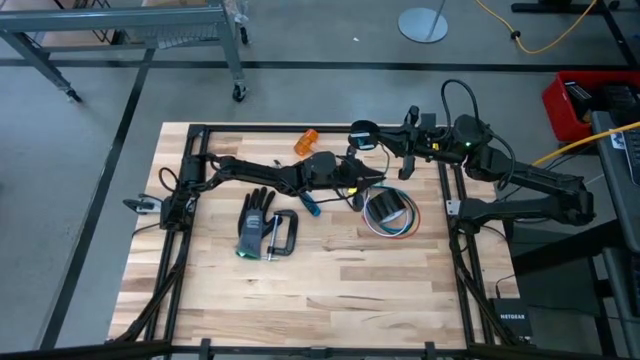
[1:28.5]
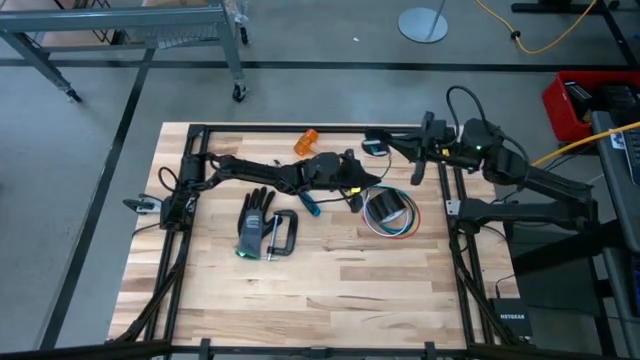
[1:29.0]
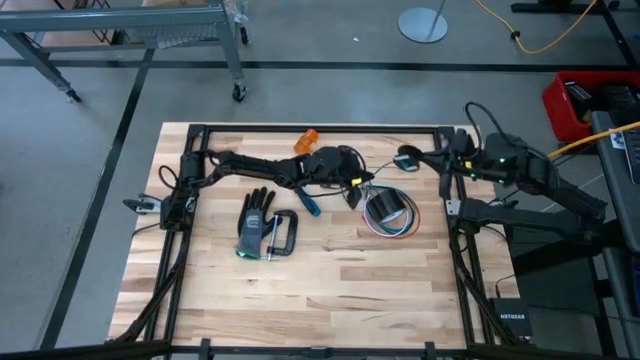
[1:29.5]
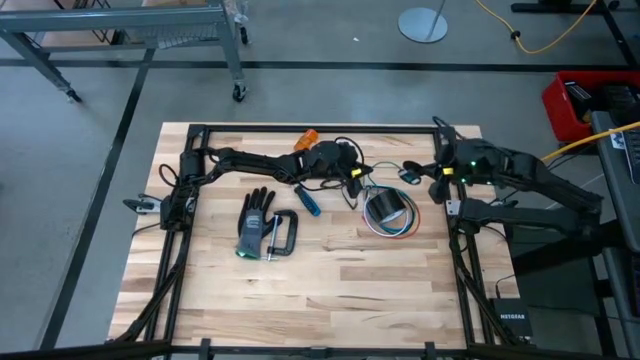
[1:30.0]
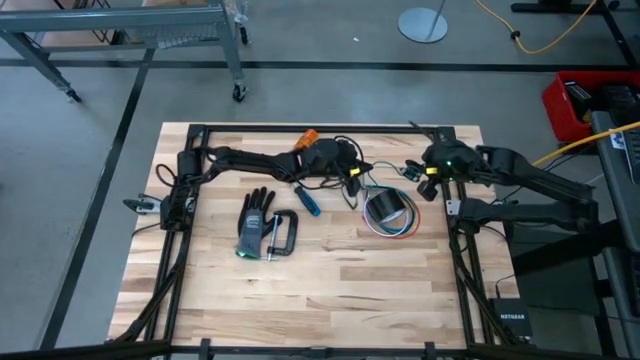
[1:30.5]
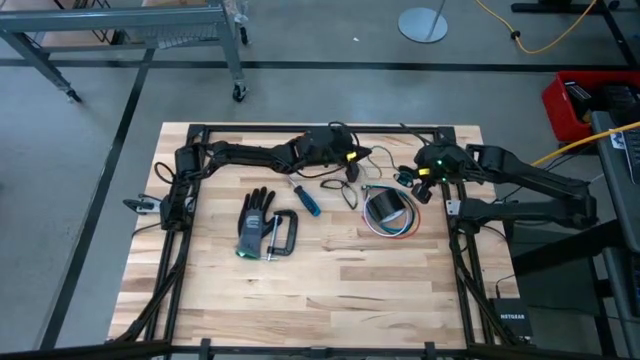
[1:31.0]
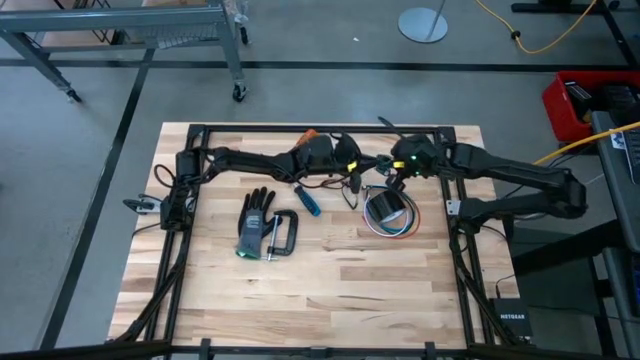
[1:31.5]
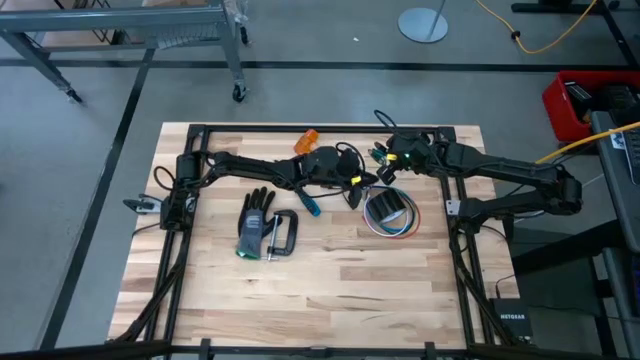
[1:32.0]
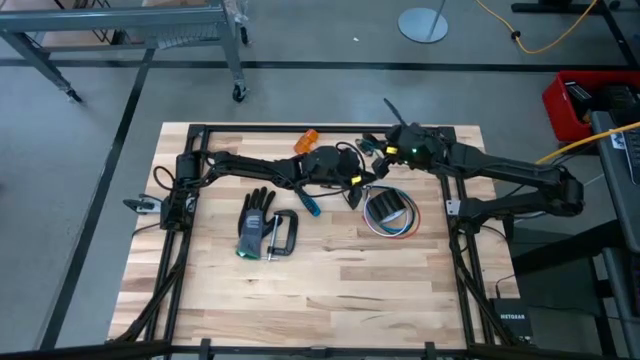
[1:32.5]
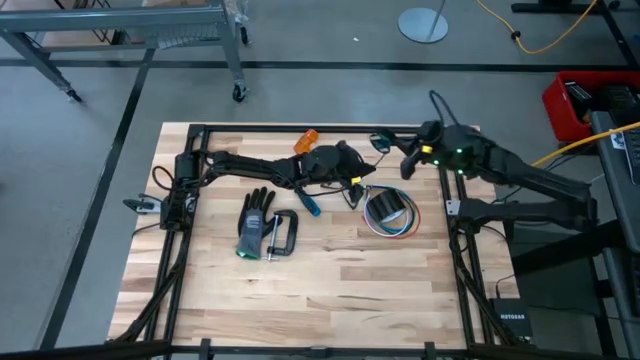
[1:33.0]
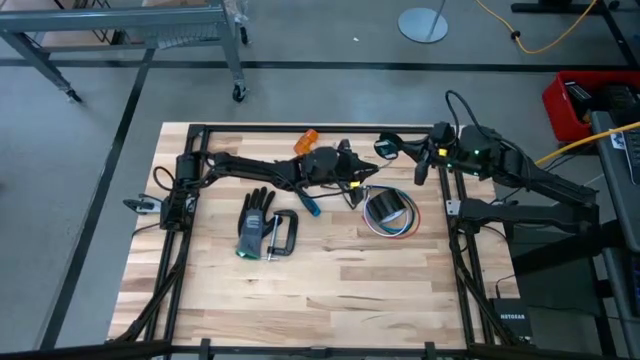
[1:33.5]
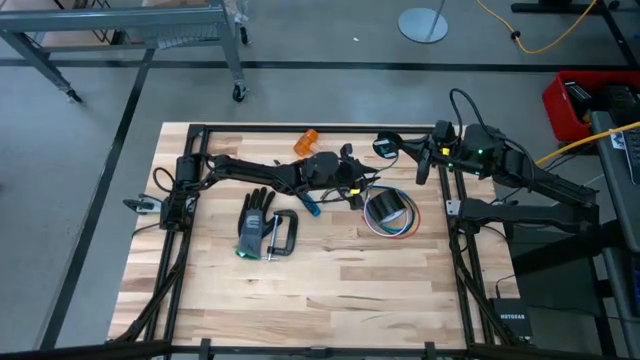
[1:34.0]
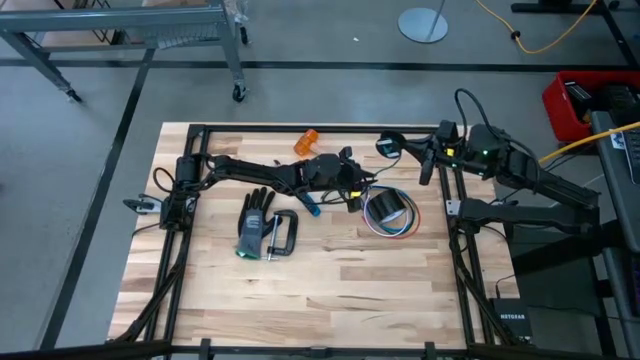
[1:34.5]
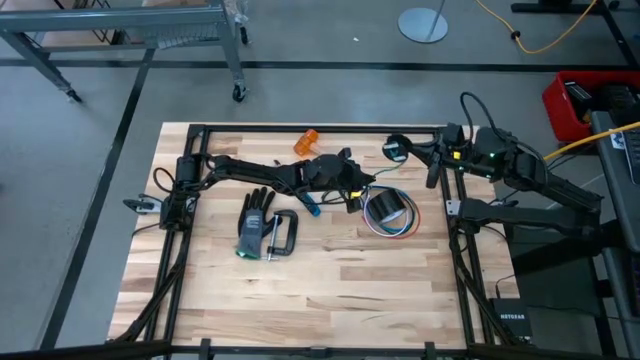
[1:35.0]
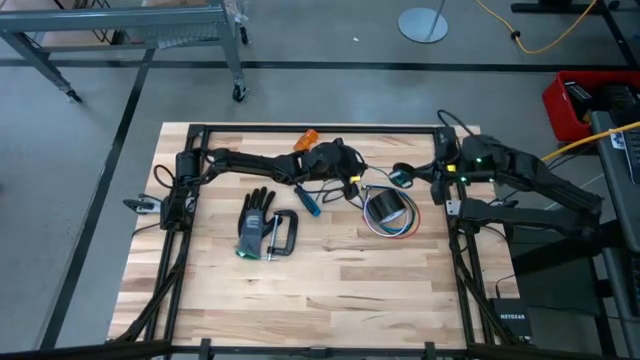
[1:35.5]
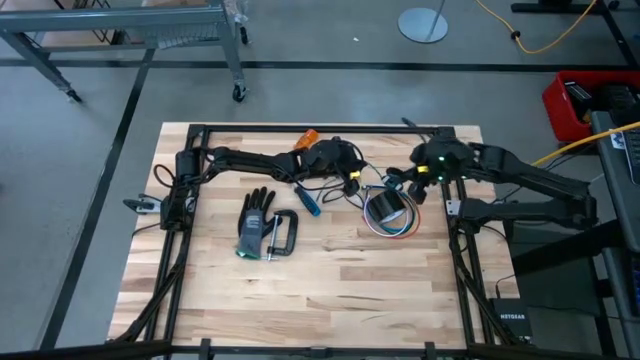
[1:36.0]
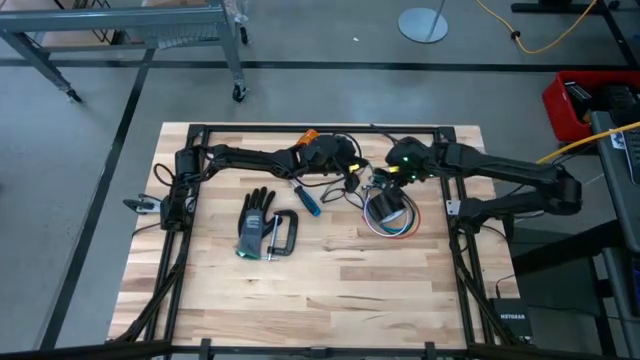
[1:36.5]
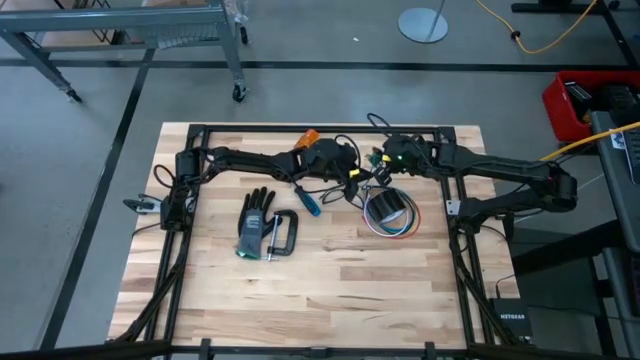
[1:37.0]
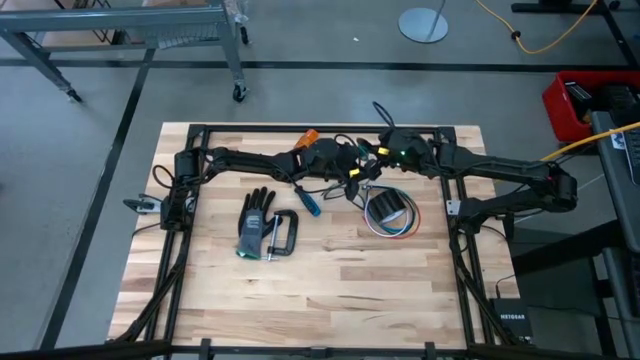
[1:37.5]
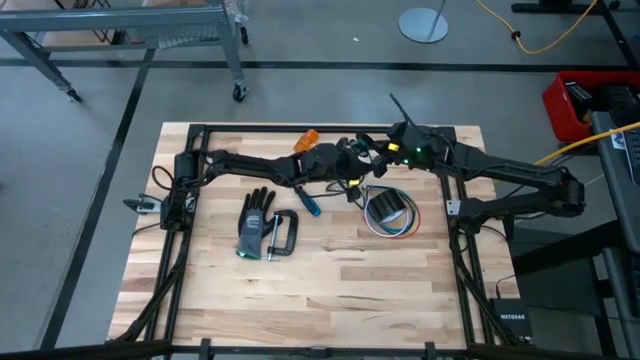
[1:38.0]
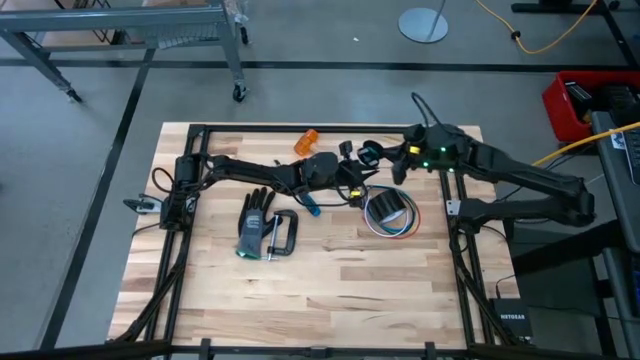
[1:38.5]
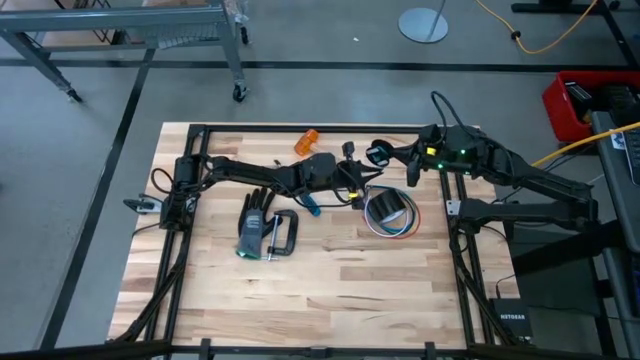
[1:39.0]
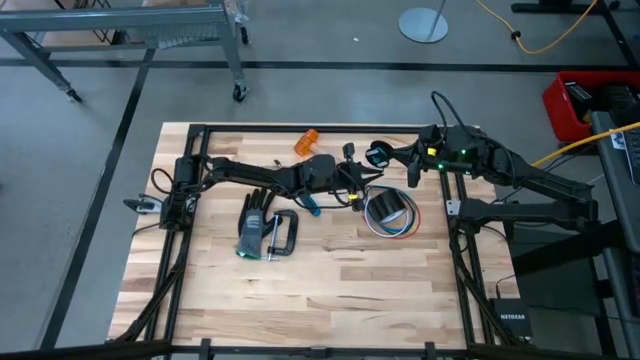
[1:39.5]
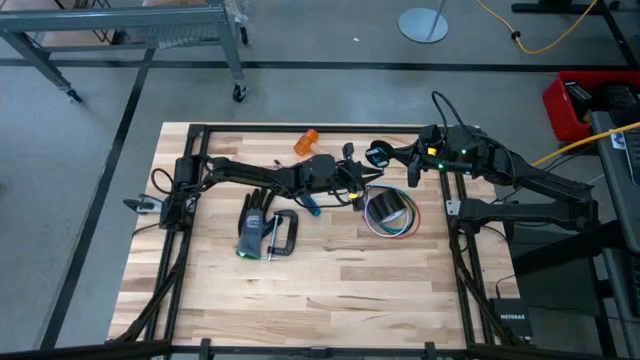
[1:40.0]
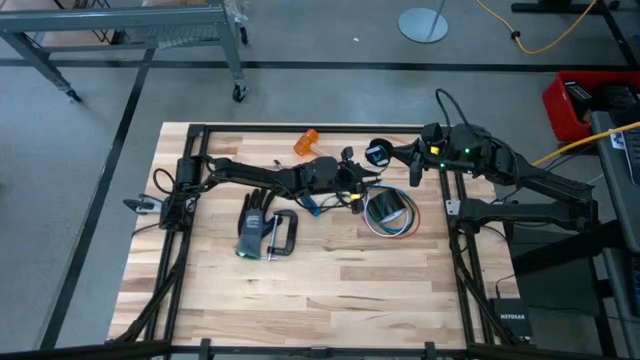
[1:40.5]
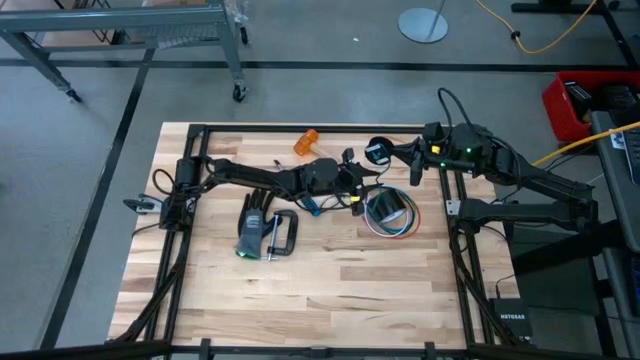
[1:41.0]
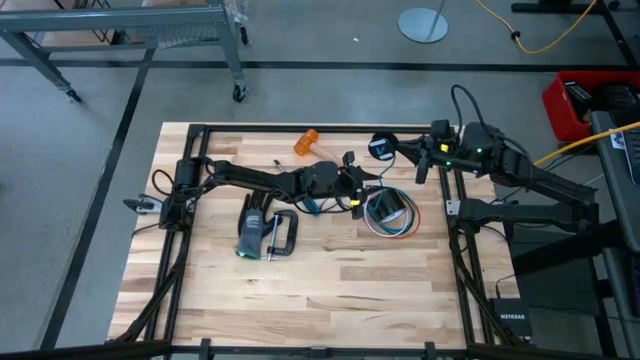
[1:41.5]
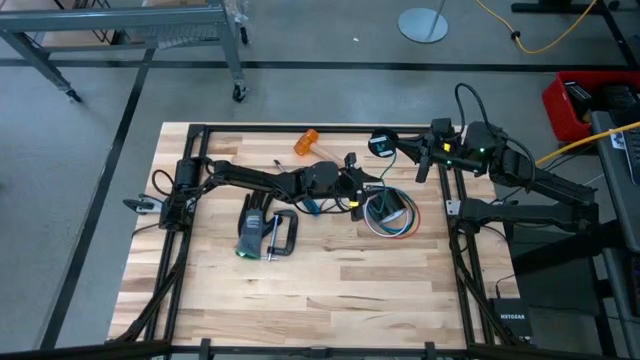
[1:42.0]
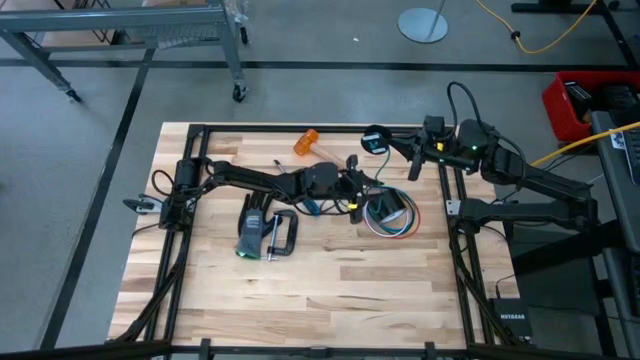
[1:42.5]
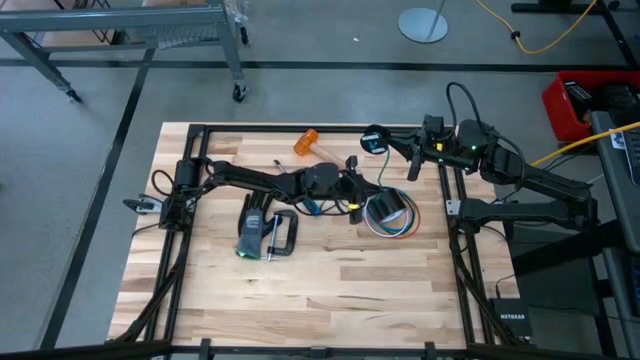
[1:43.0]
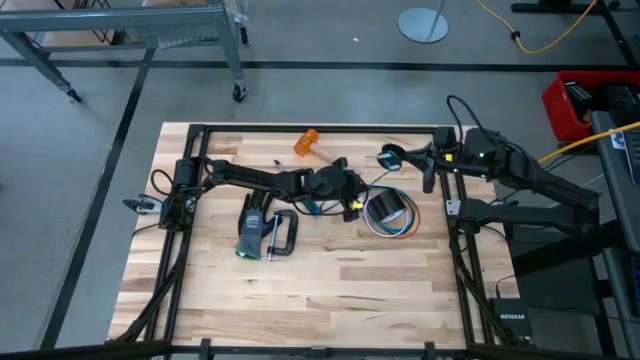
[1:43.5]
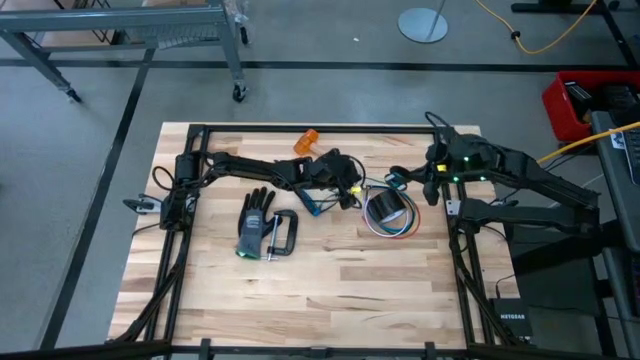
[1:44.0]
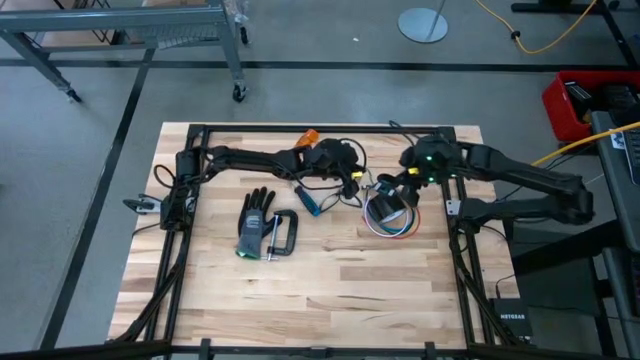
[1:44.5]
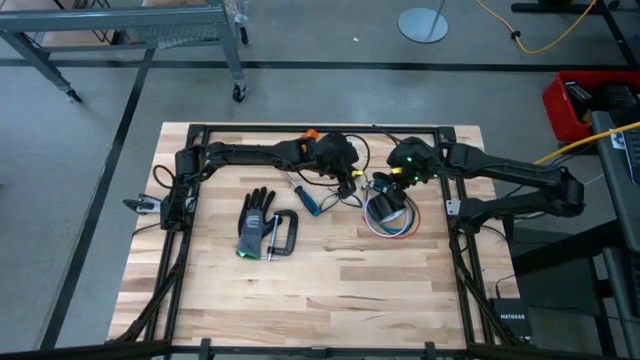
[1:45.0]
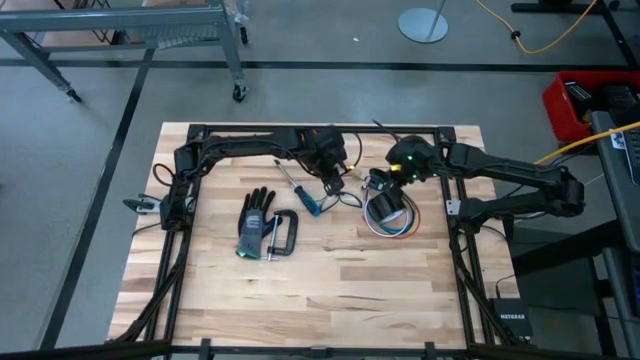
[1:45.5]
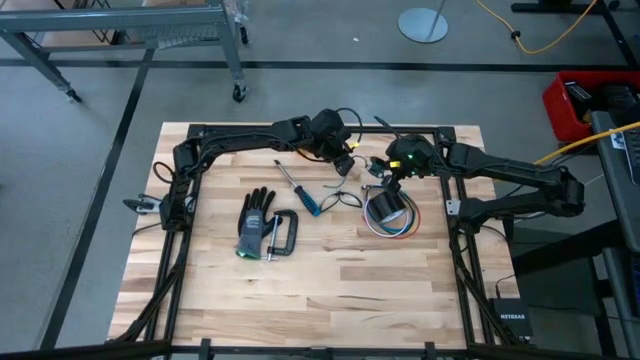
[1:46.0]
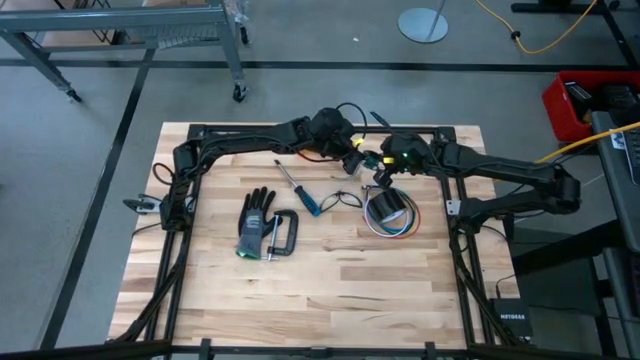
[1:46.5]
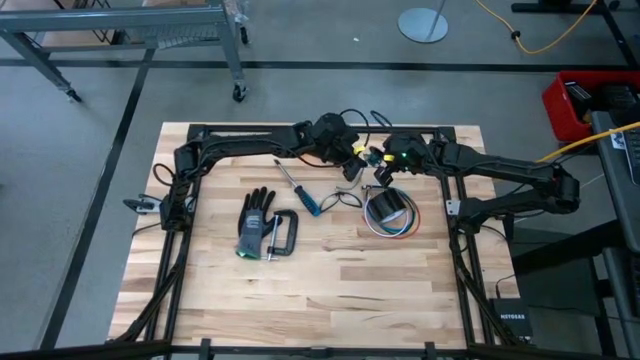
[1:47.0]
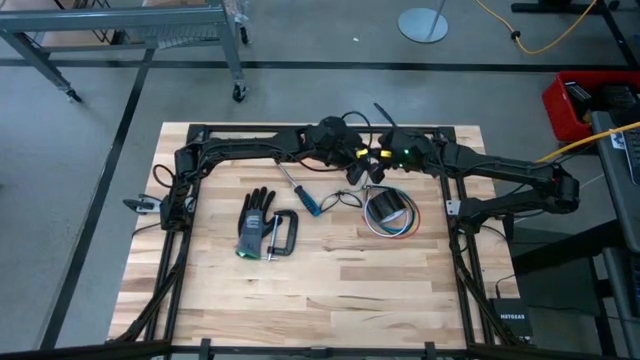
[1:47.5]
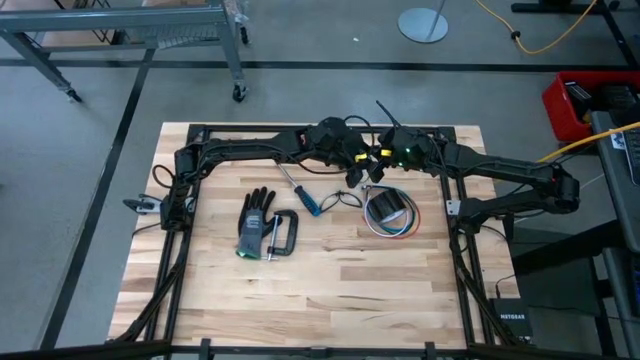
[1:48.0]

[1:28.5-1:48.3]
Task: Coil cords
Coil the green wire onto the spool
